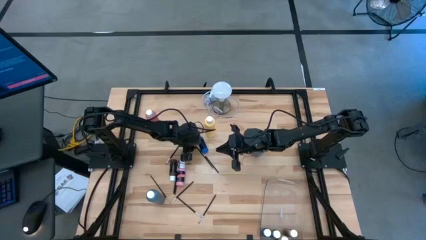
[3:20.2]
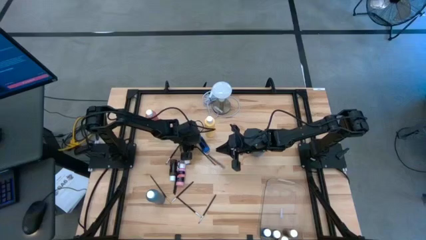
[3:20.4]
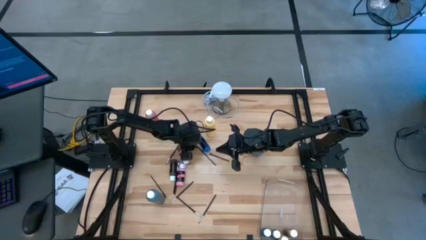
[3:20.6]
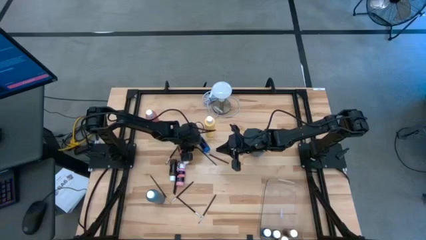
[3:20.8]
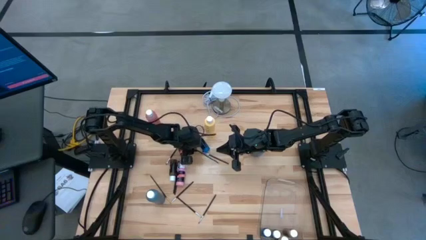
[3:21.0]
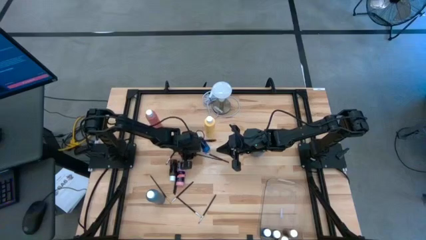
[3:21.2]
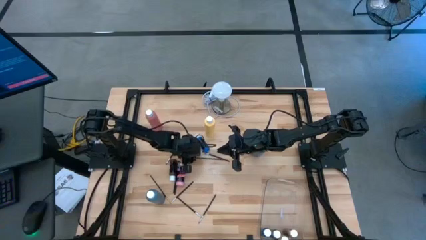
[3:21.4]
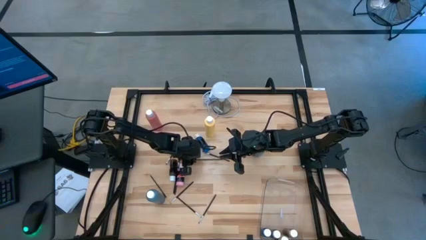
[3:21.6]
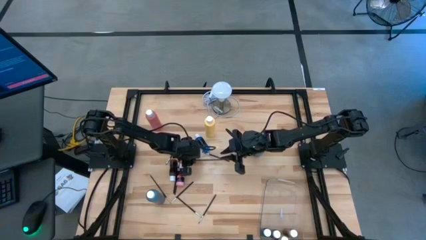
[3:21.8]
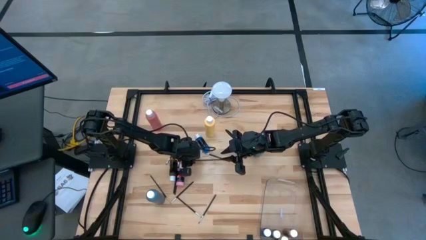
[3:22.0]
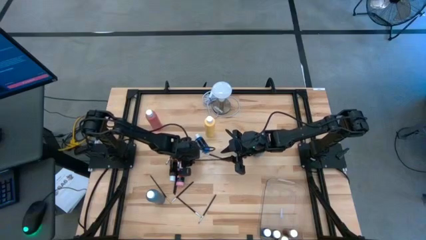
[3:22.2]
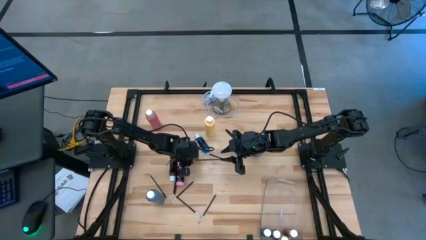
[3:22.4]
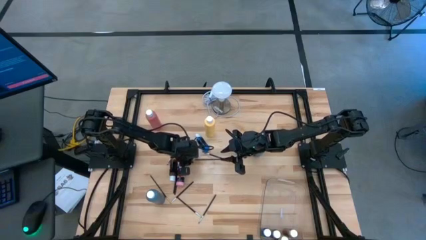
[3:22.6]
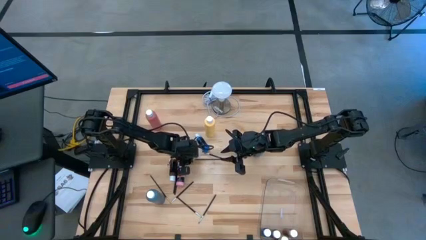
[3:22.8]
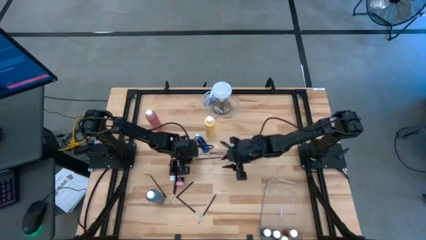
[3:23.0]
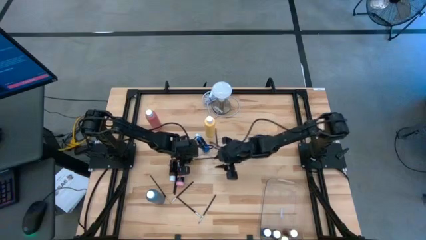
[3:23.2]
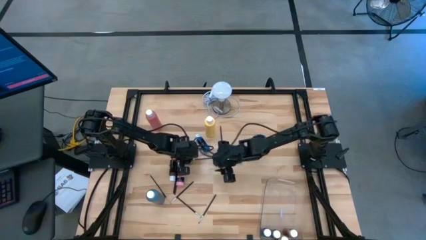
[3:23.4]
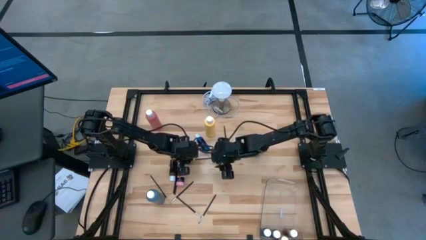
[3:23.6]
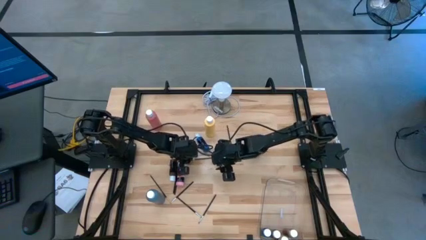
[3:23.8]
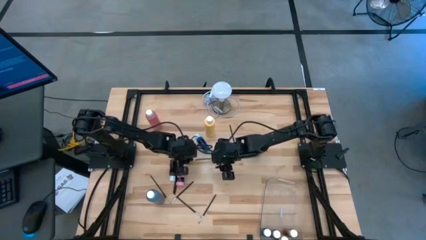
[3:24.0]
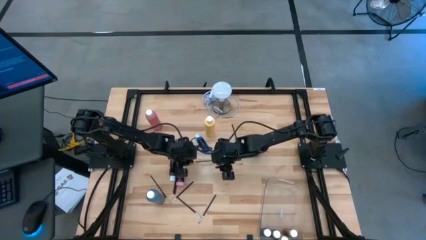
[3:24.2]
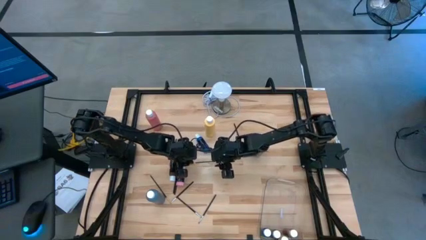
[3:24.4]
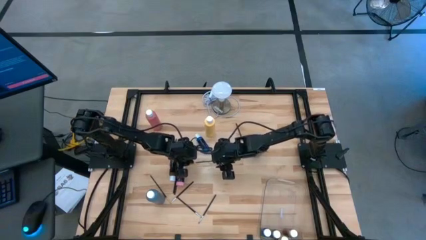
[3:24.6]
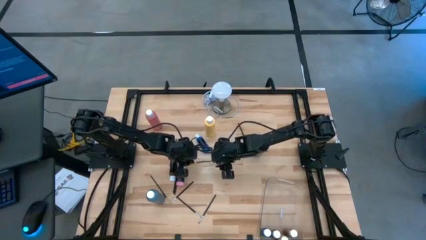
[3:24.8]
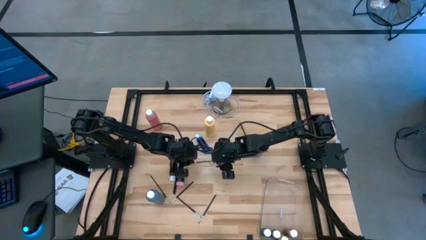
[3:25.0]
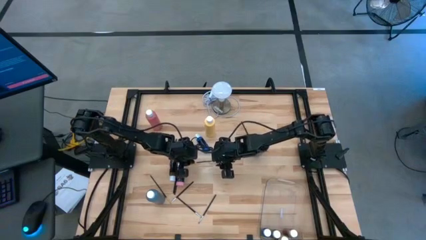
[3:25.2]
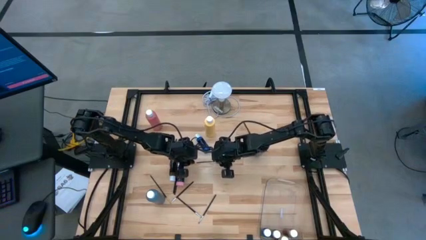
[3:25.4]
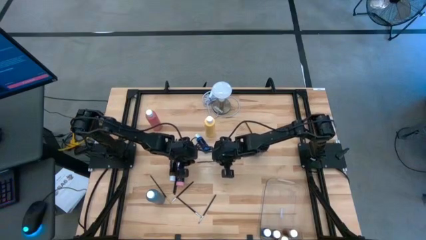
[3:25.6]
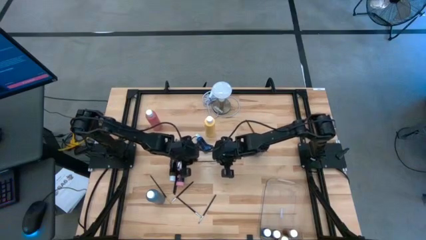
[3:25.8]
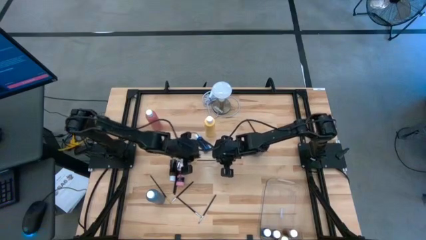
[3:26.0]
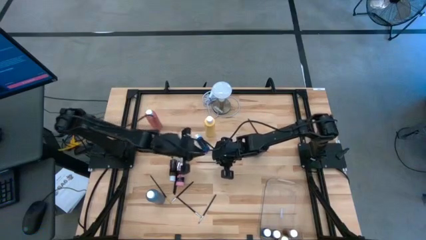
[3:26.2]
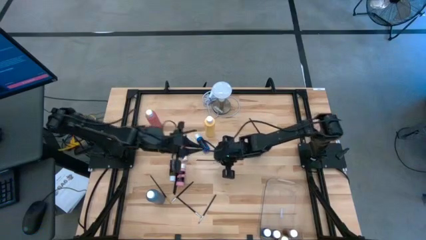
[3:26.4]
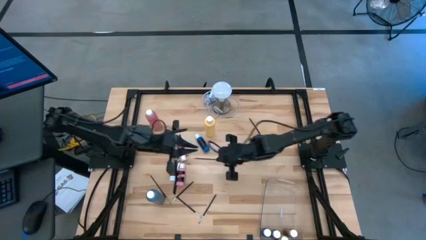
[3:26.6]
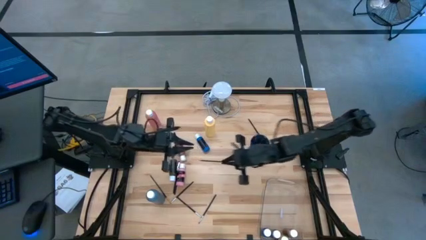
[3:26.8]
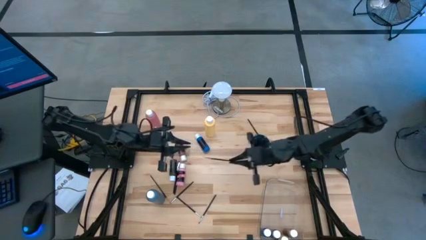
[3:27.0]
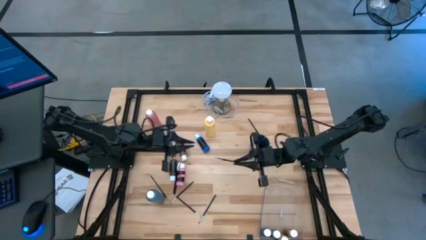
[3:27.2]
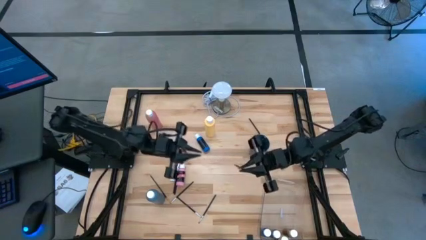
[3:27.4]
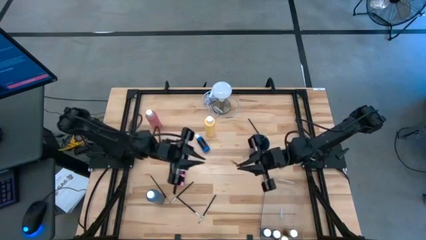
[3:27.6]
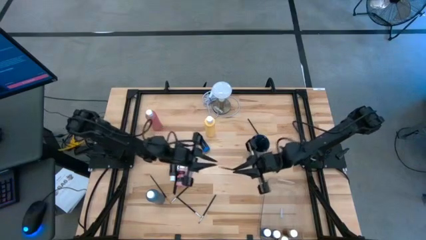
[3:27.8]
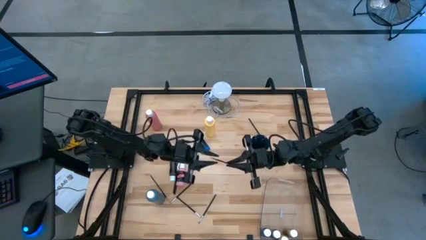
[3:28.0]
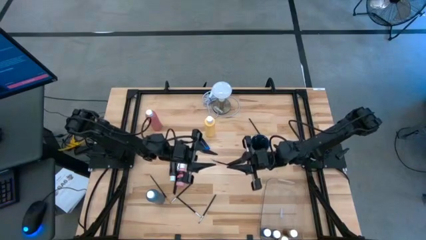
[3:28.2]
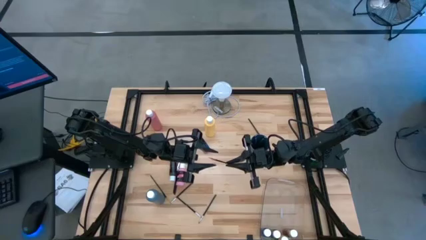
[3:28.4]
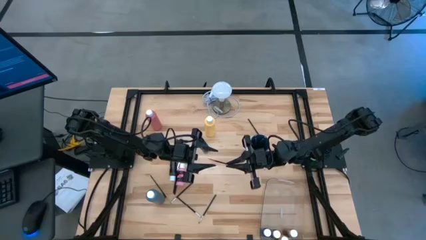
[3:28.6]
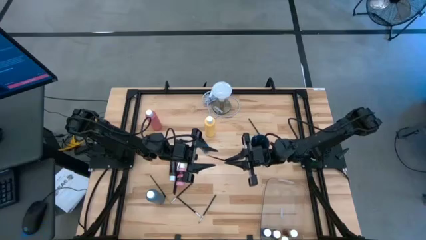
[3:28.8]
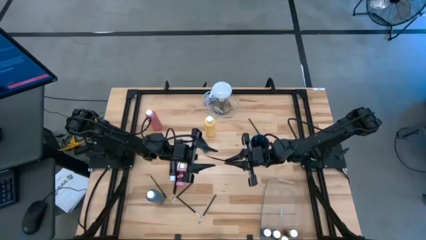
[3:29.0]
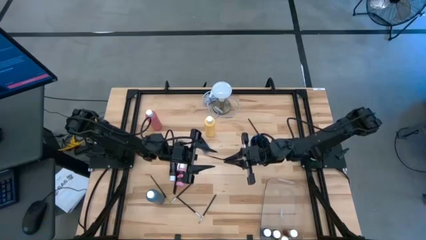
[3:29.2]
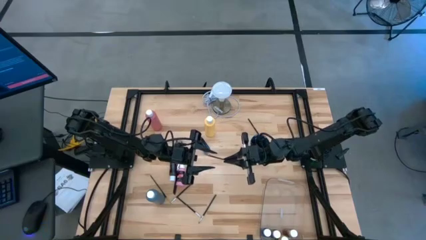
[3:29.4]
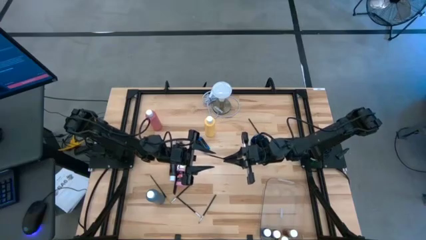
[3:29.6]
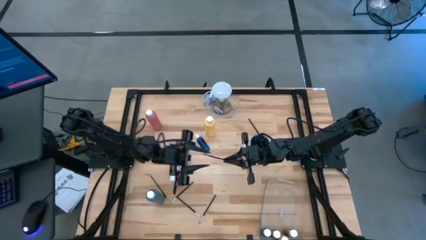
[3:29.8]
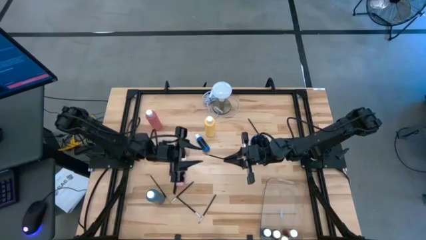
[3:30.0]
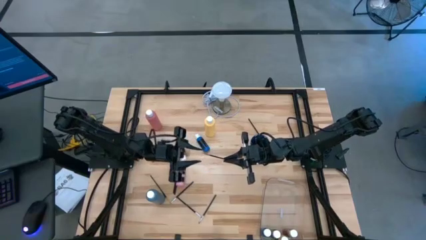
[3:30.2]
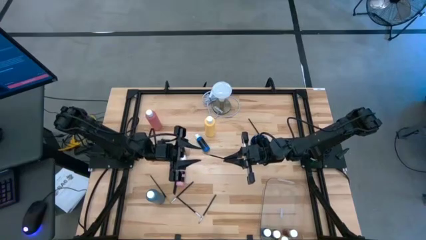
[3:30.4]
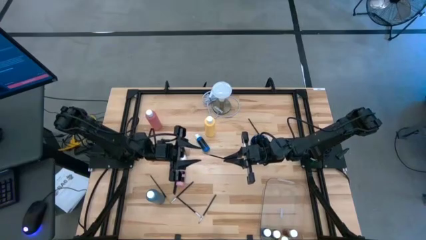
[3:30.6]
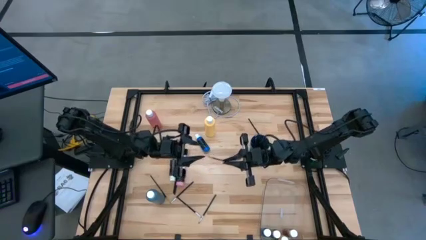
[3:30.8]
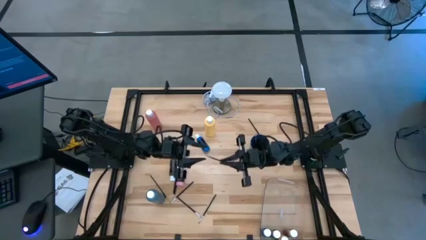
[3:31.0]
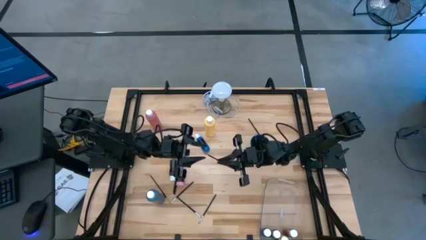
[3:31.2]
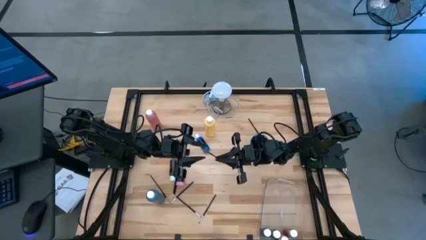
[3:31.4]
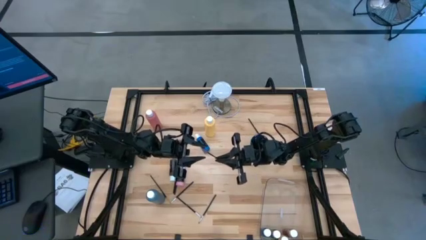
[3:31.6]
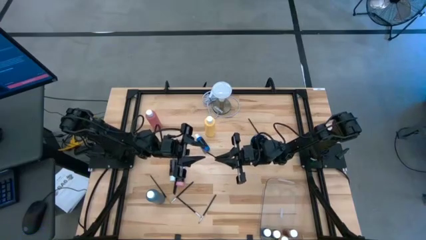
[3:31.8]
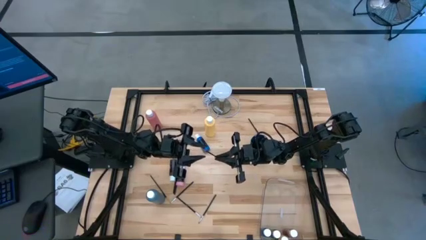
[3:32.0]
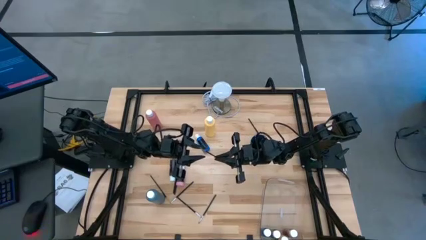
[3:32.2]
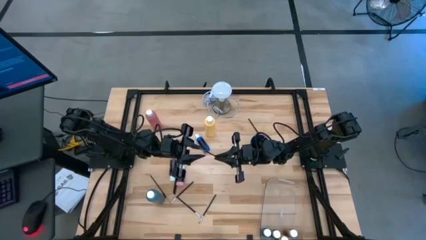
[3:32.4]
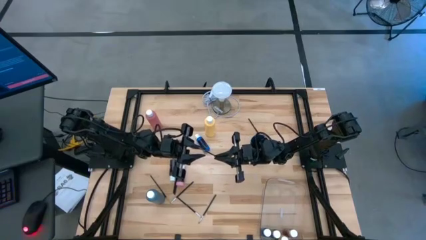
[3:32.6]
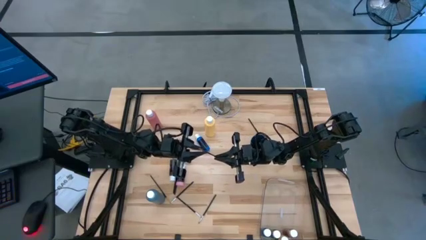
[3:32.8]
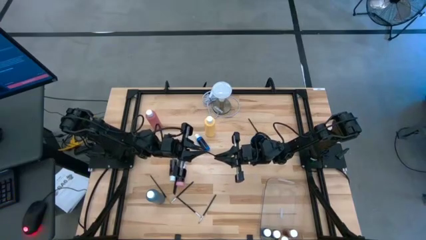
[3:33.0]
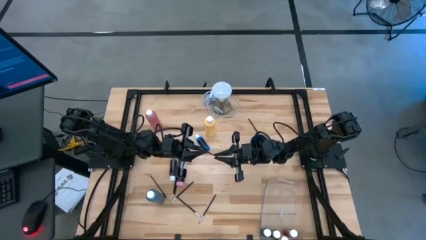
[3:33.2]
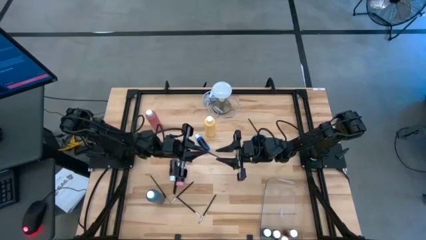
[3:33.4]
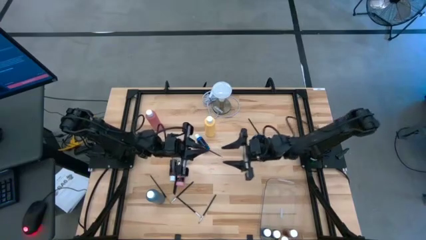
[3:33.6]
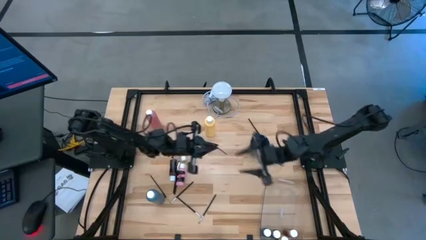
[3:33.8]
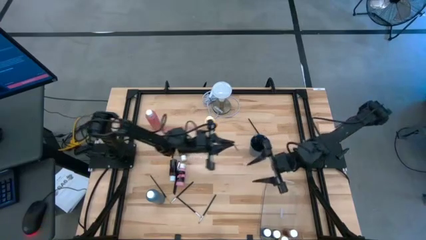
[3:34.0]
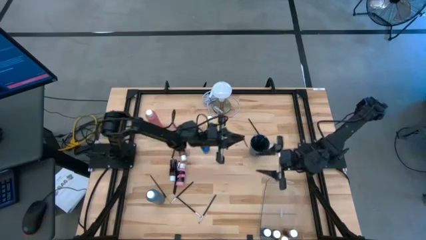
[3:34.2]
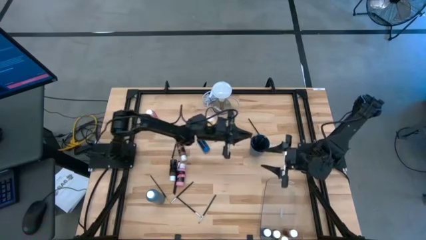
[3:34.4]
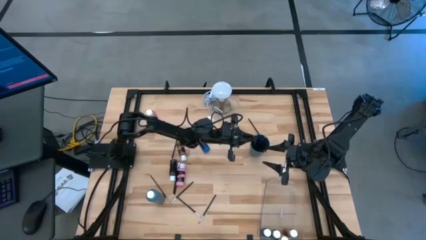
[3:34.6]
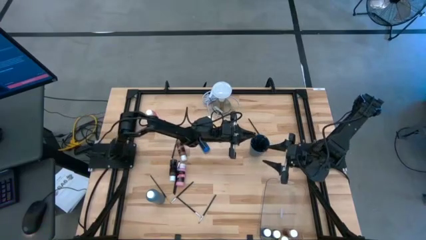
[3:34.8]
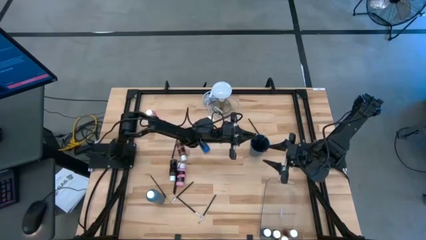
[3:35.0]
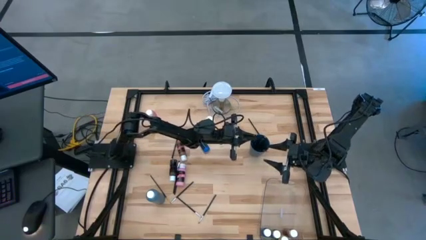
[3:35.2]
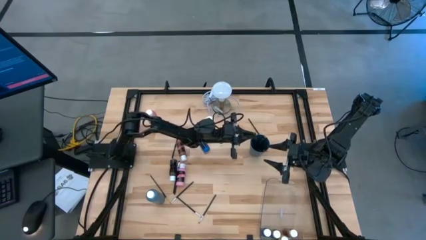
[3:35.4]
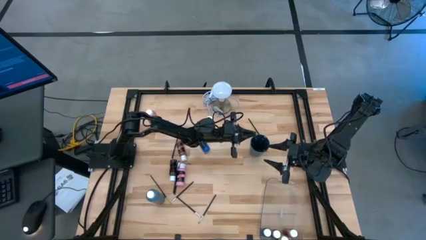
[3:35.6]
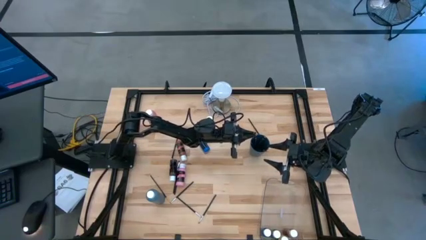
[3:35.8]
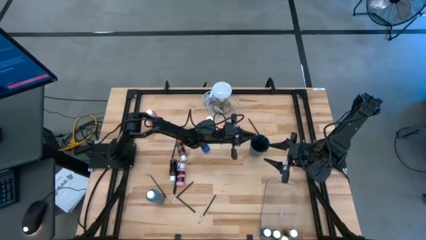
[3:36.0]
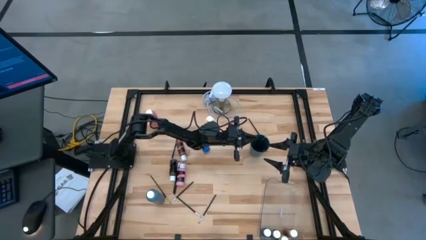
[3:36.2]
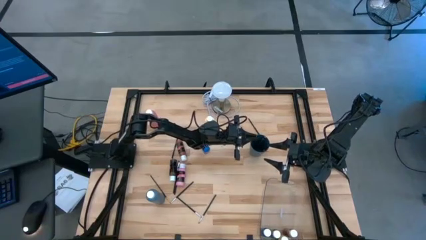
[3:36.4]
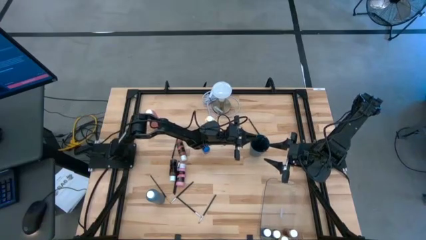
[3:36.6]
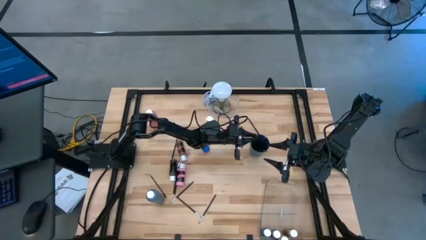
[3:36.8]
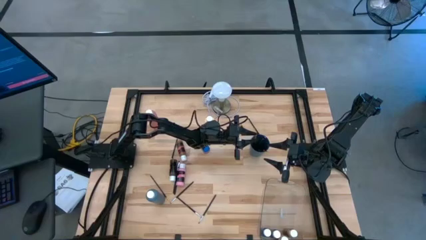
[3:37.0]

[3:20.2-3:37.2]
Task: Pick & Place Paint Supplies
Put the top black gold paintbrush into the blue cup
